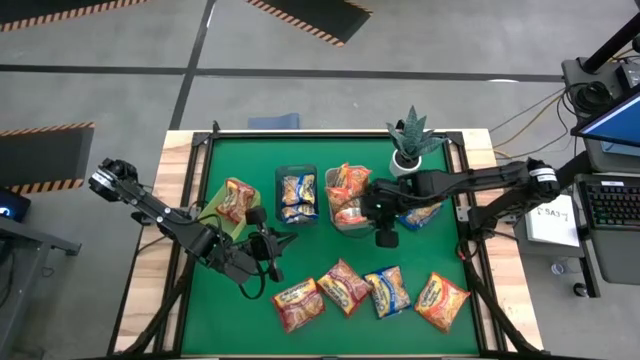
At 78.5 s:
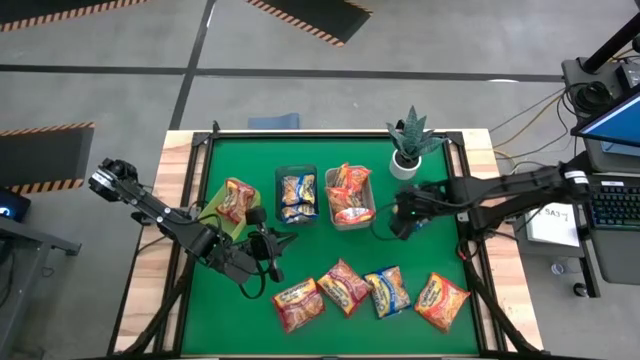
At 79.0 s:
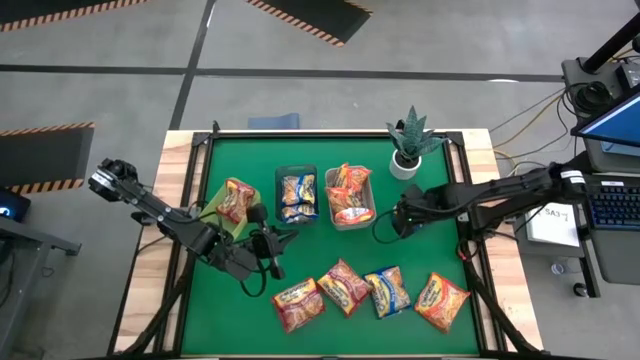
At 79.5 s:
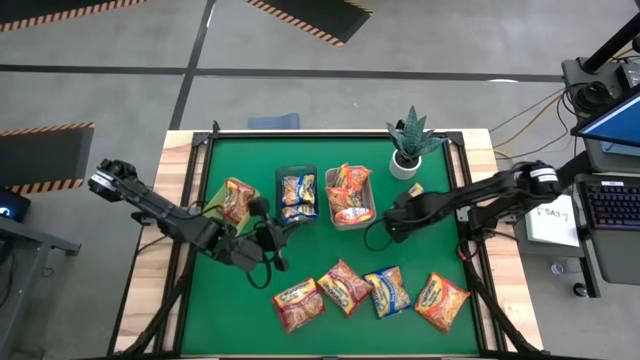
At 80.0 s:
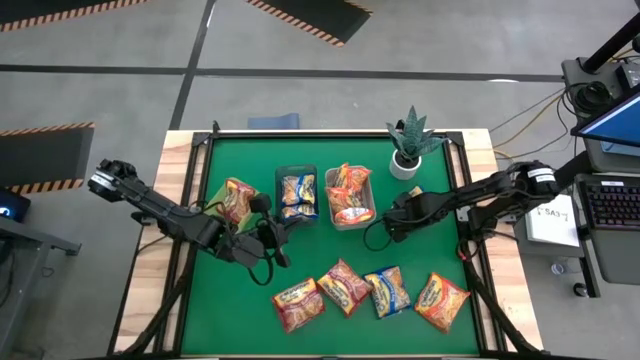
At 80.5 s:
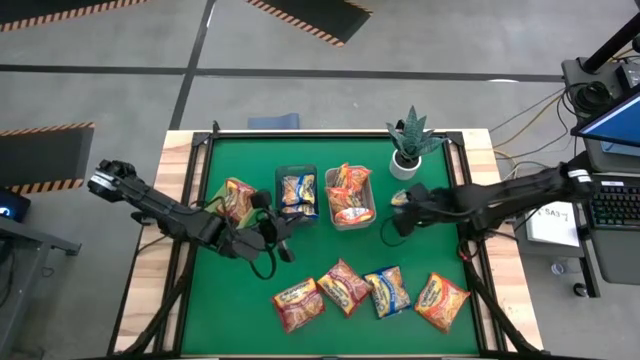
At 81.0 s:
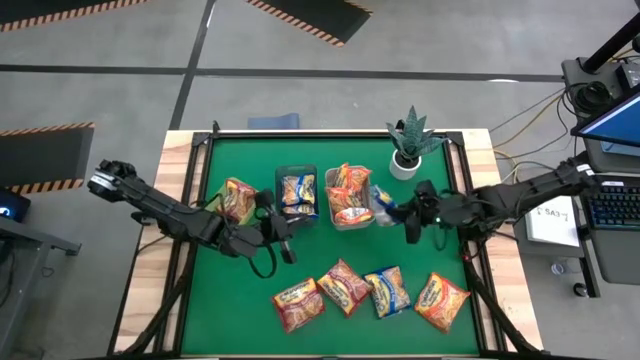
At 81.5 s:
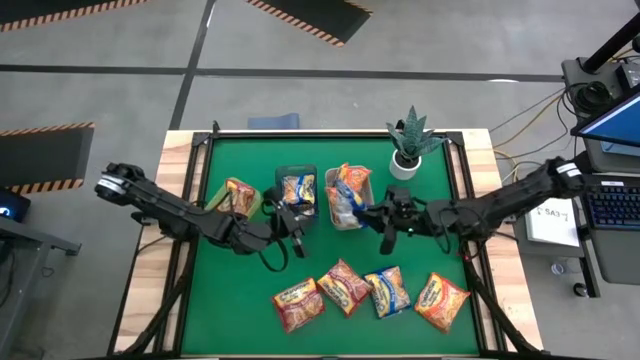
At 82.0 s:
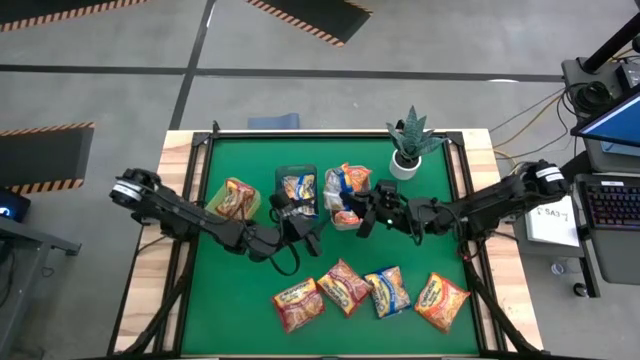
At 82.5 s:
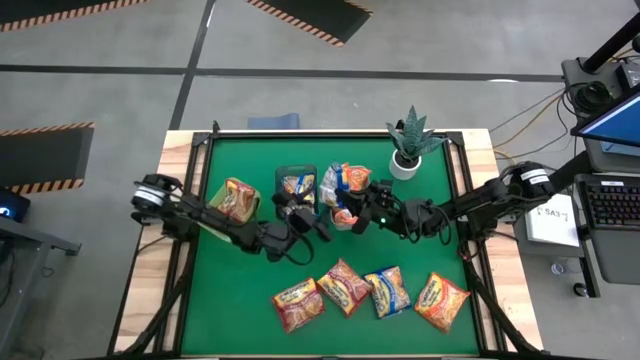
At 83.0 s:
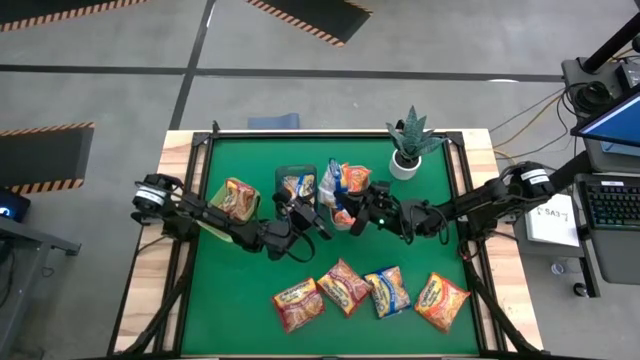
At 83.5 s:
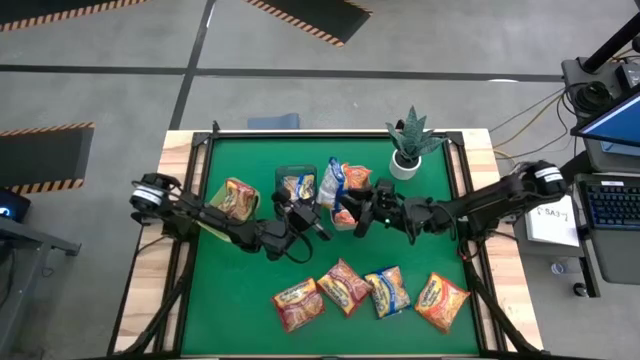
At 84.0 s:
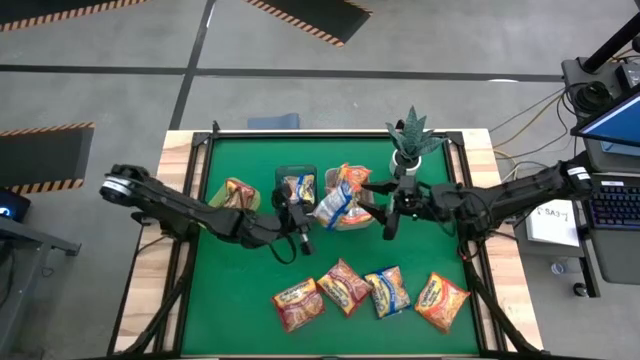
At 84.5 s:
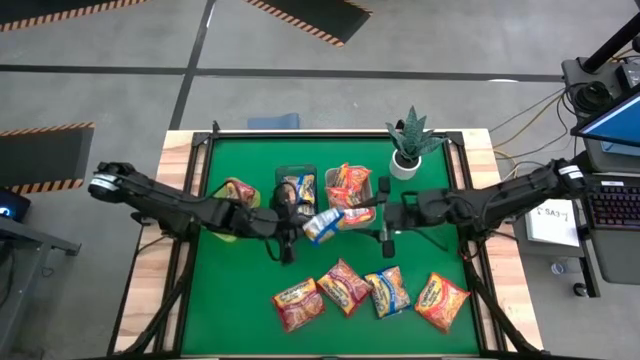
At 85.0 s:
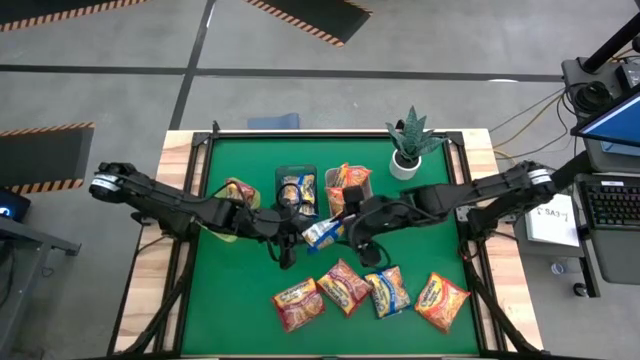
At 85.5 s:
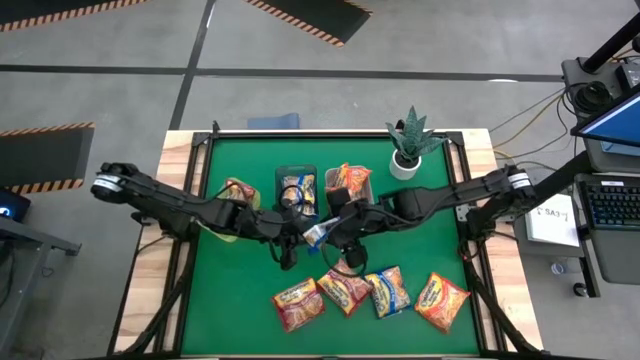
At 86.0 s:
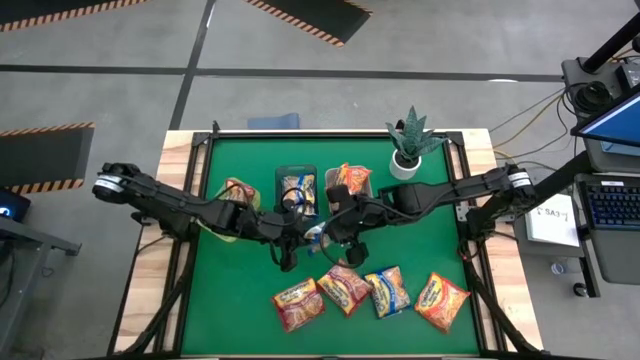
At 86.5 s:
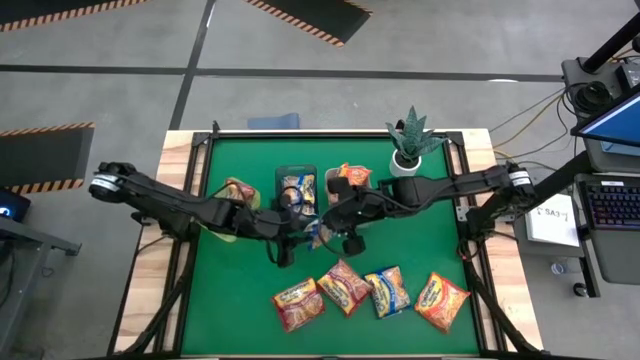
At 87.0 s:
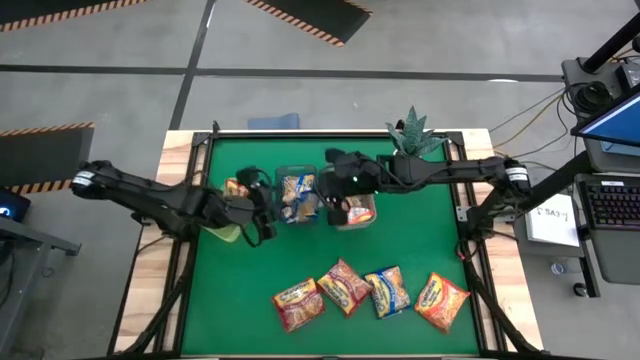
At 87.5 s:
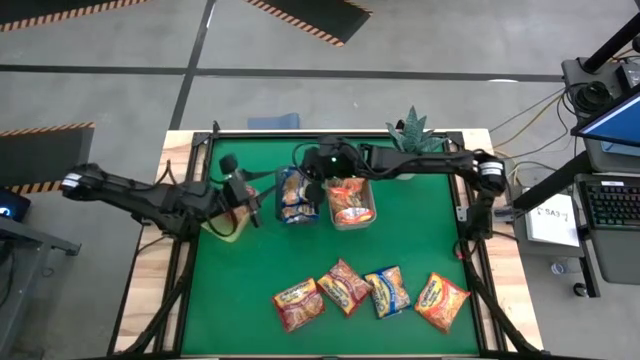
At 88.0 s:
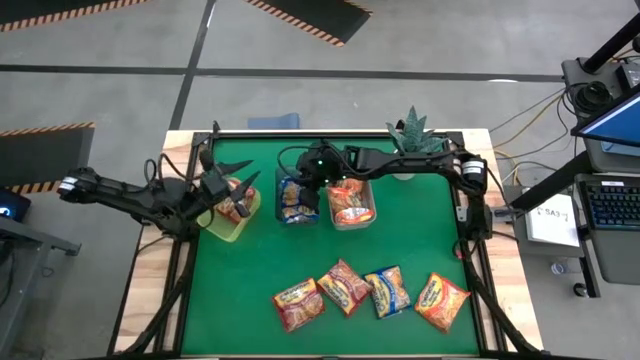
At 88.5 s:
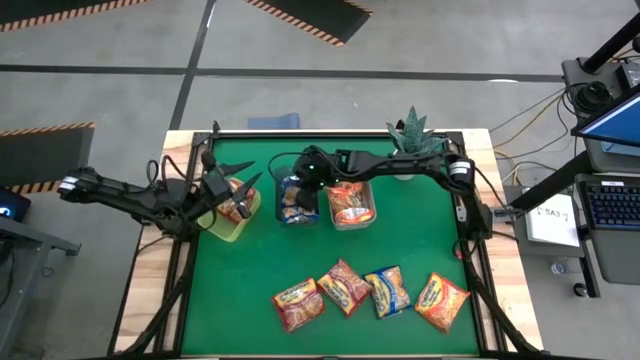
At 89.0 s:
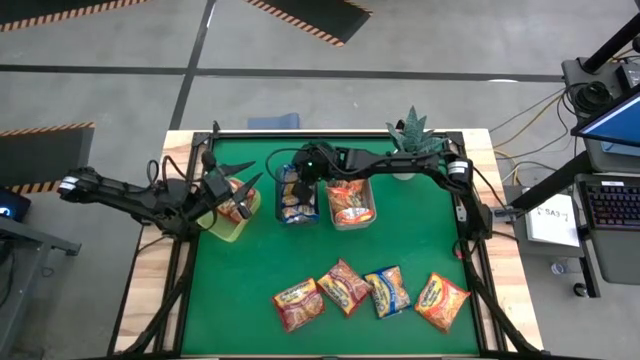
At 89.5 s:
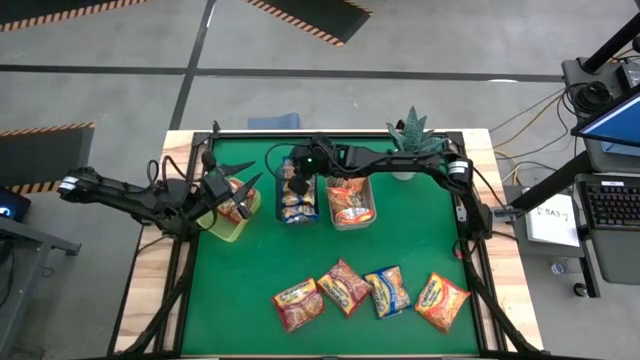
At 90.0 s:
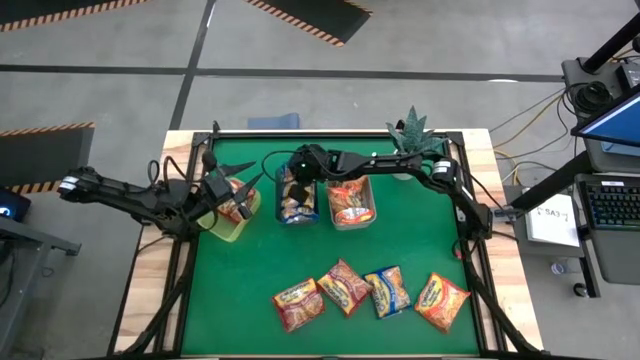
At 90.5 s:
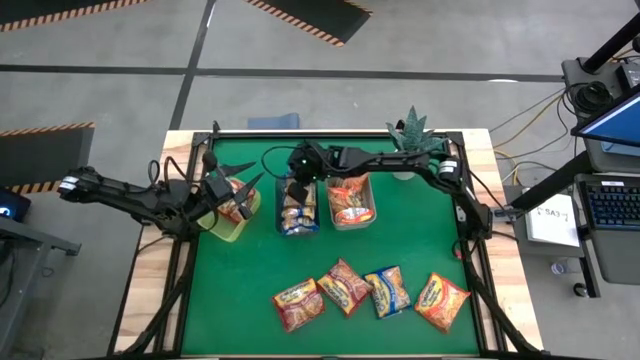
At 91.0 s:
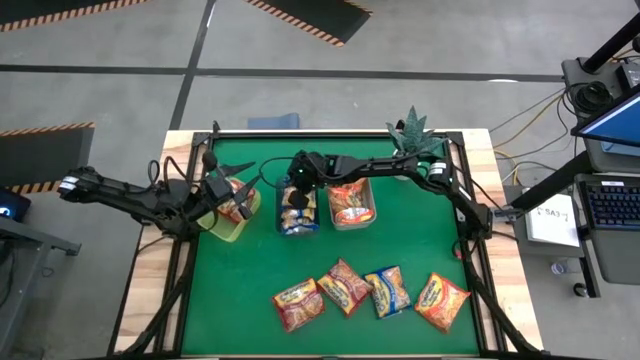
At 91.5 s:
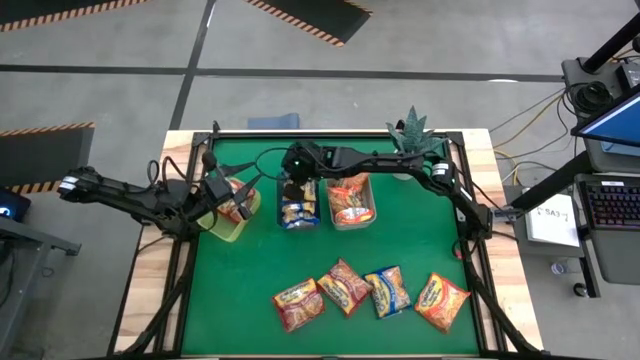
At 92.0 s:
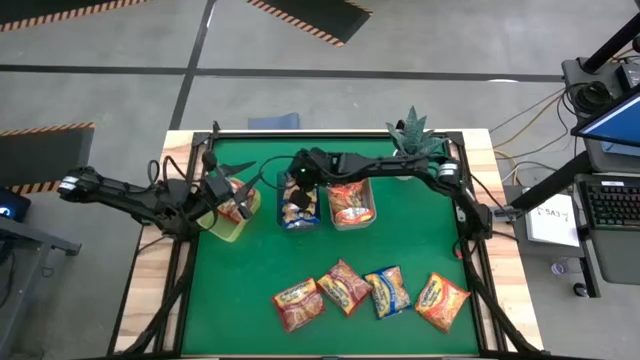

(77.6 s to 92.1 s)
Task: Sort Maruchan noodles
Put the blue noodle pack into the black bin

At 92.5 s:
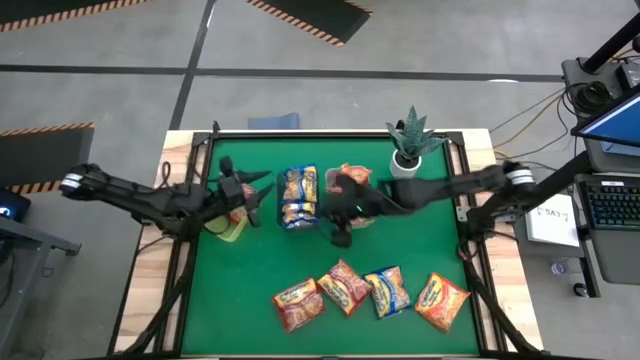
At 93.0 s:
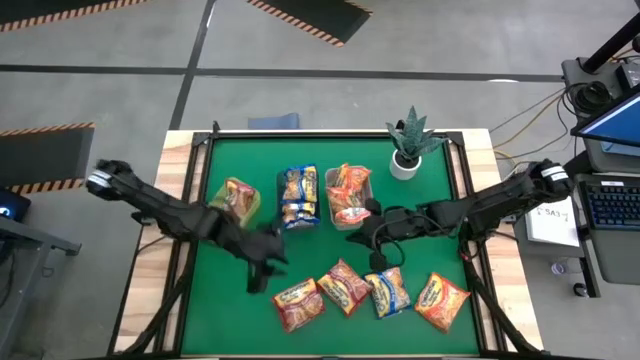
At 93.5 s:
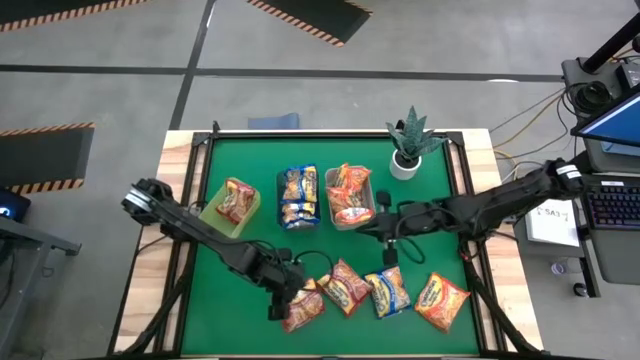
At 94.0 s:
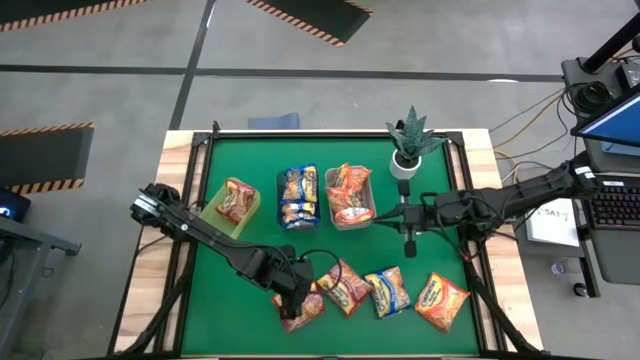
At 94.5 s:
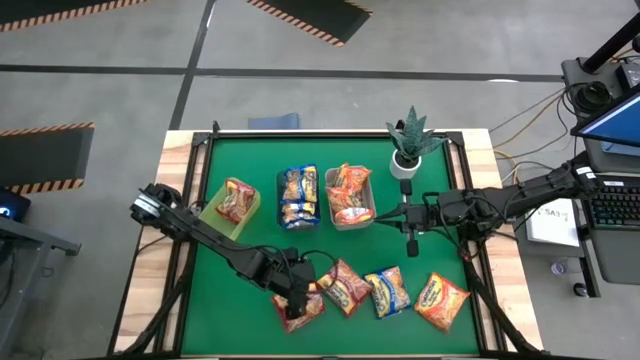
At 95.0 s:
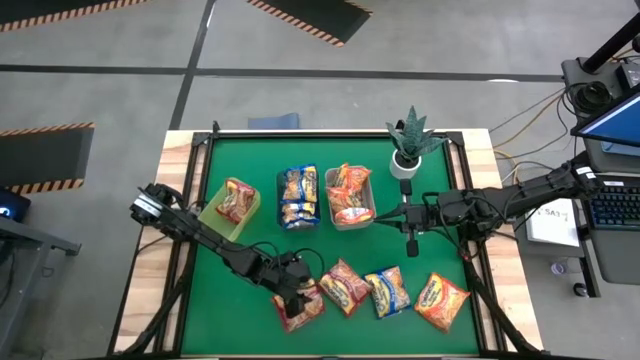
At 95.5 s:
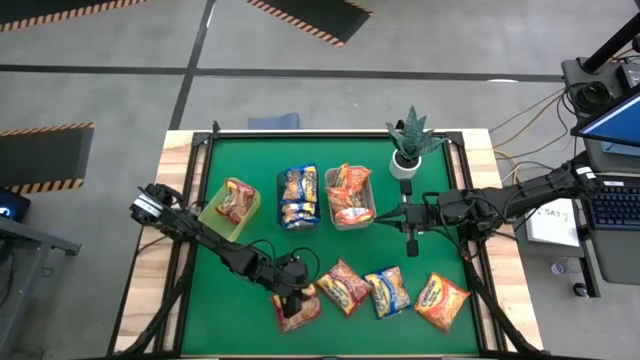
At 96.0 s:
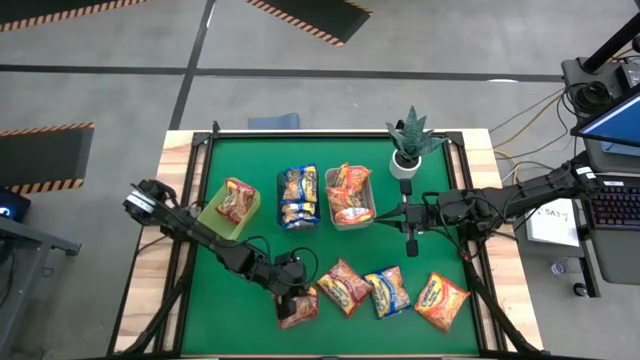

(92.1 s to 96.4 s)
Put the red noodle pack into the yellow bin

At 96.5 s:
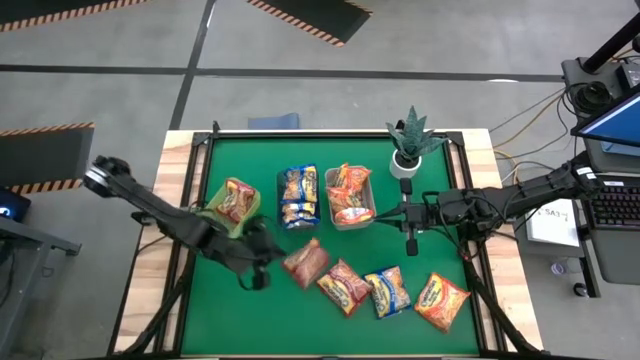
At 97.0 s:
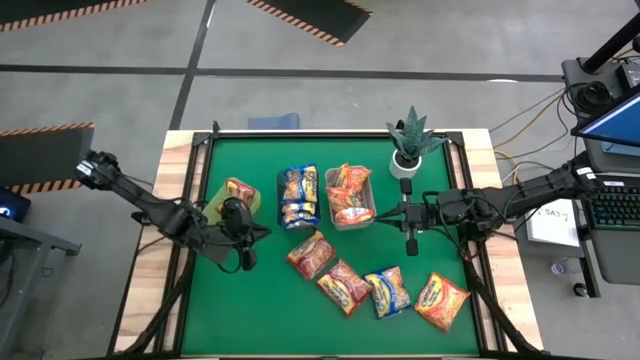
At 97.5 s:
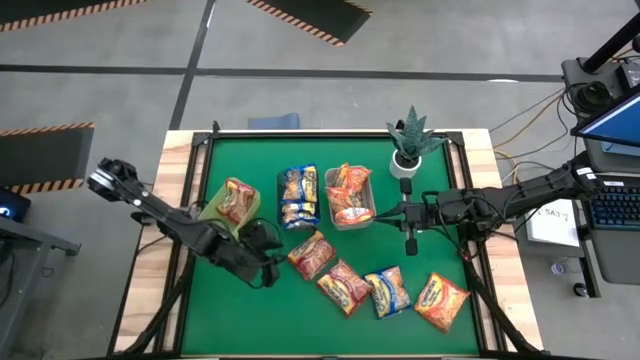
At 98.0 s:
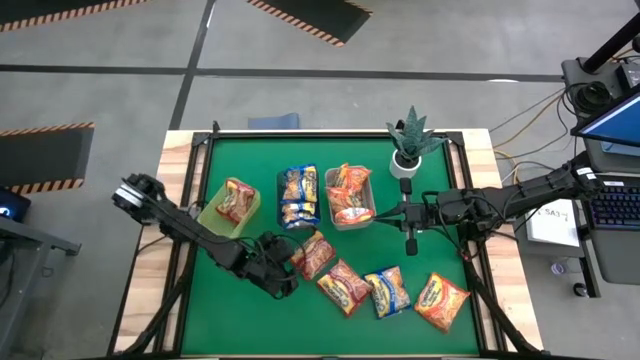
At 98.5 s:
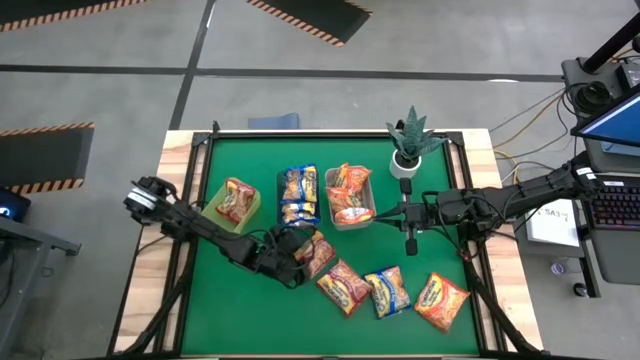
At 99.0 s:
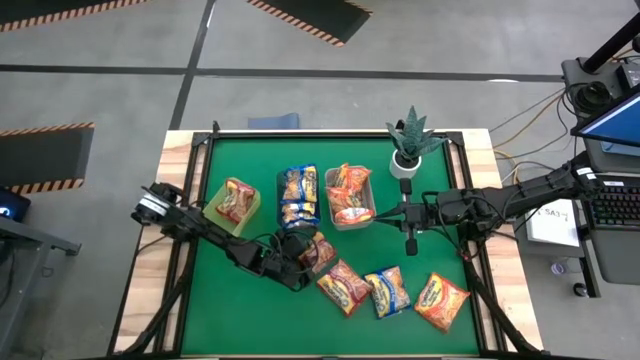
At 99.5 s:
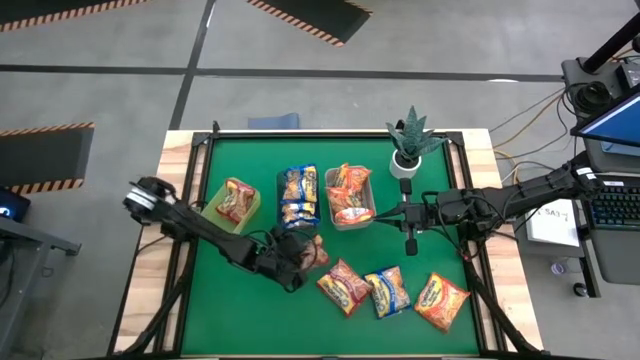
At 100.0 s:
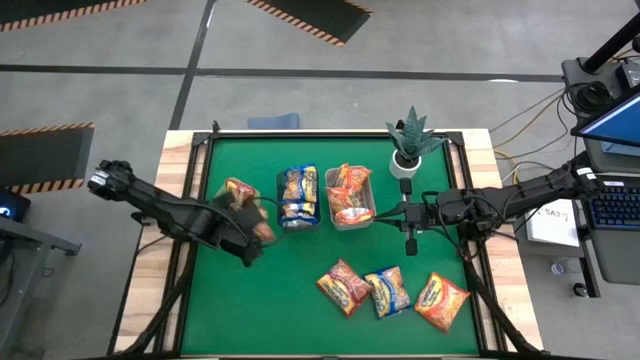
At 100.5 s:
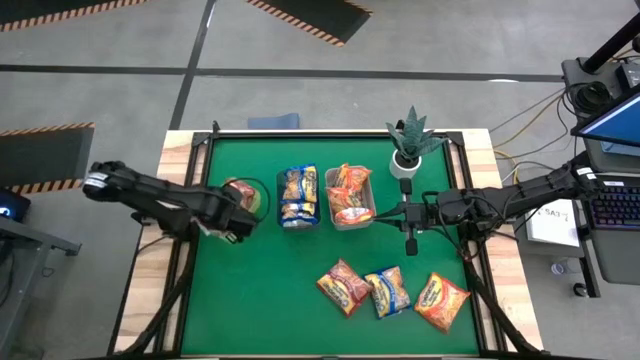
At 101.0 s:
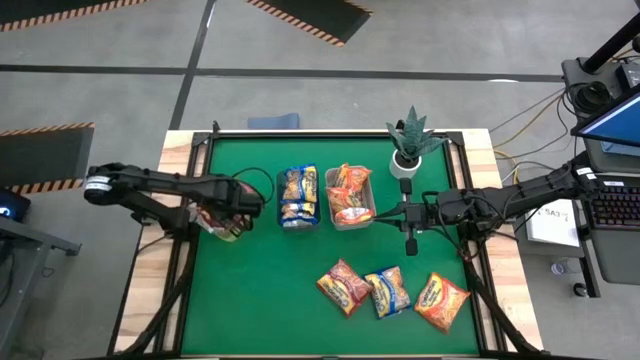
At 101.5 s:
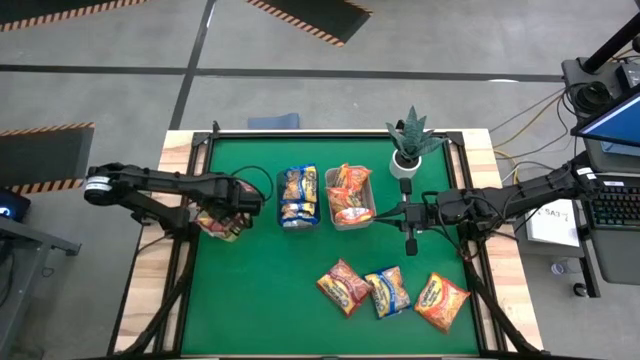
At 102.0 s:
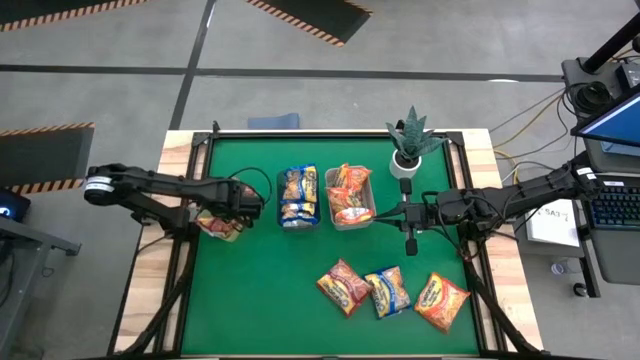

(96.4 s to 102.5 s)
Put the red noodle pack into the yellow bin
